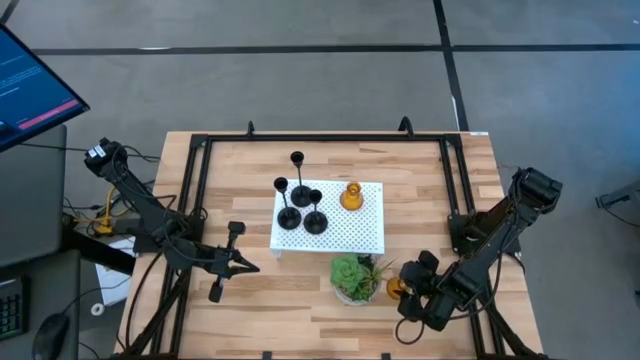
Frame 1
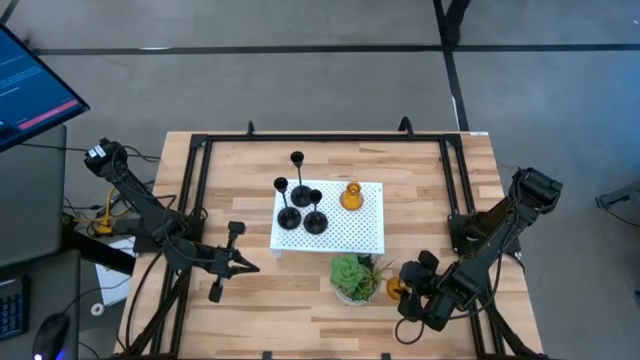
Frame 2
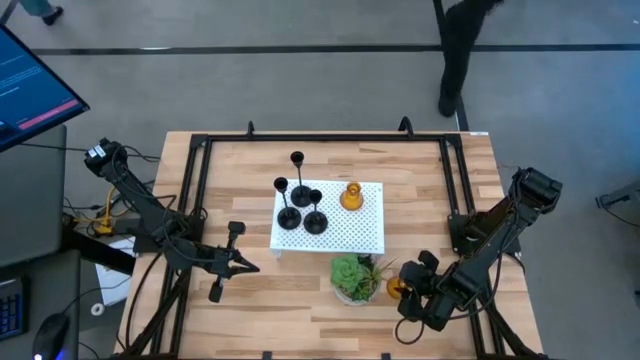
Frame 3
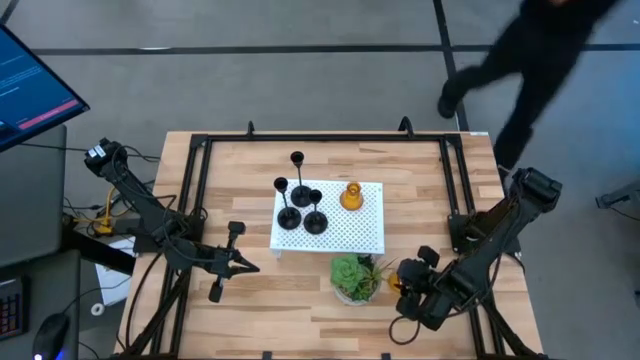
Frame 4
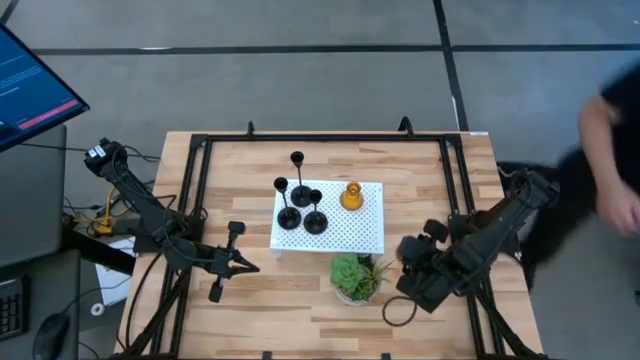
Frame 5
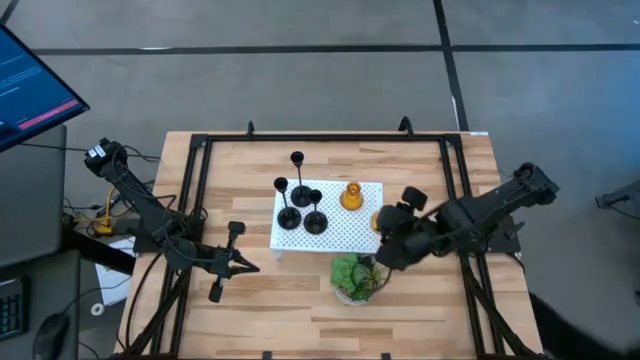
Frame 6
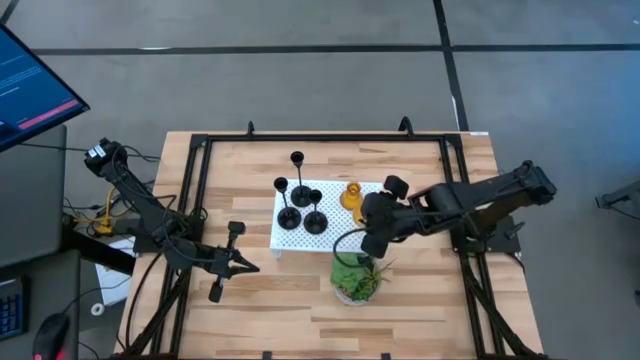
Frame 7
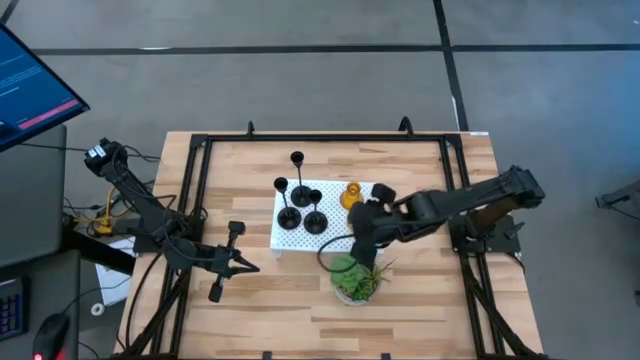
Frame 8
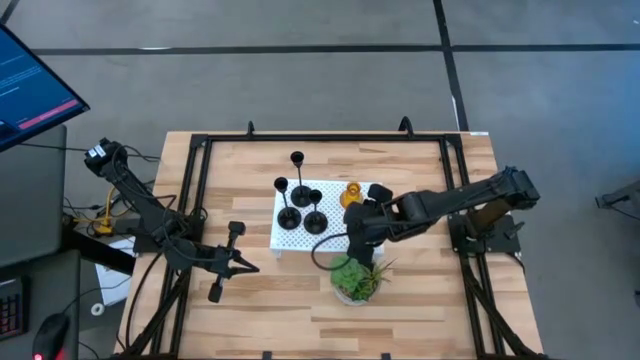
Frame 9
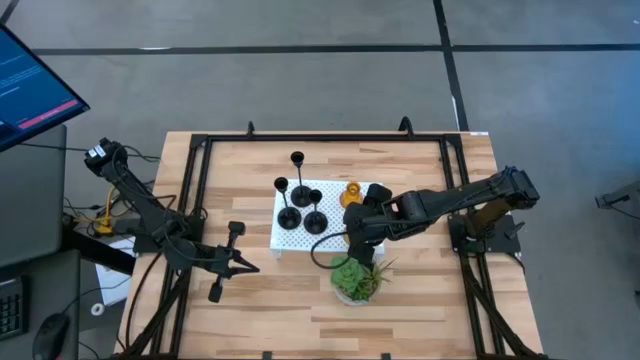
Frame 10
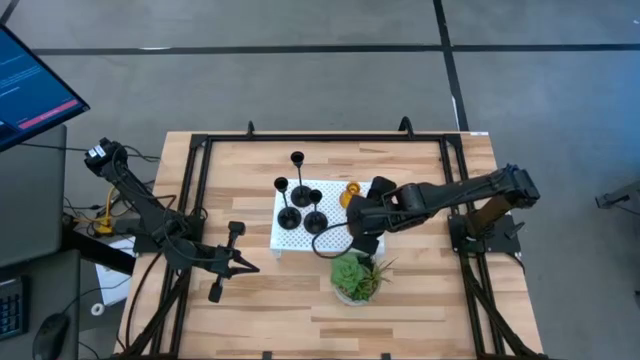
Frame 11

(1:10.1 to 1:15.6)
Task: Pick & Place candle stick holders
Put the orange transparent candle holder on the shelf

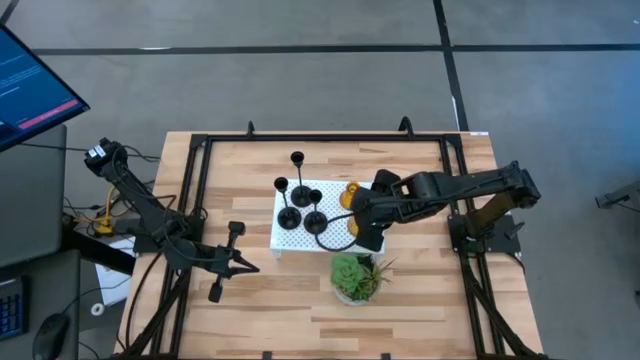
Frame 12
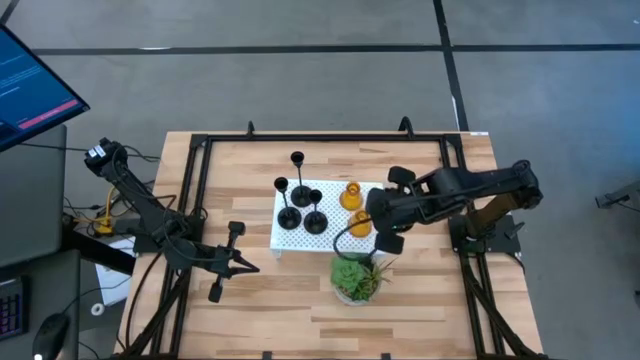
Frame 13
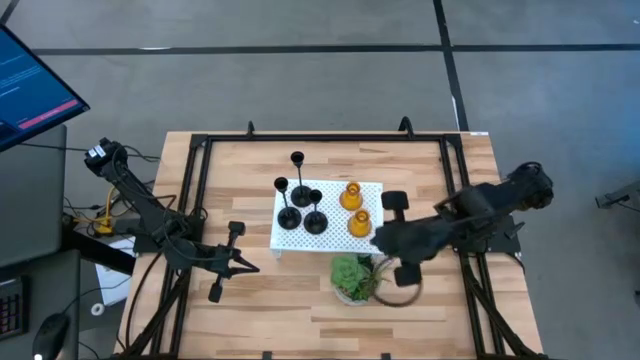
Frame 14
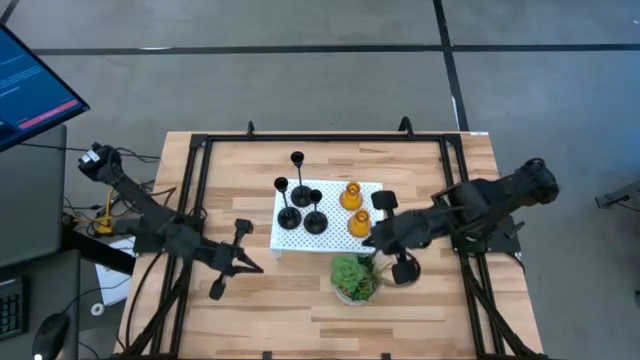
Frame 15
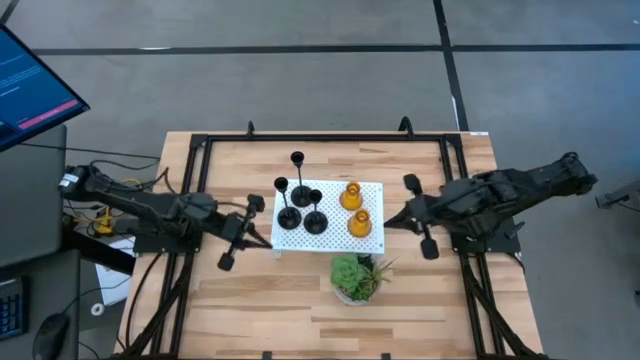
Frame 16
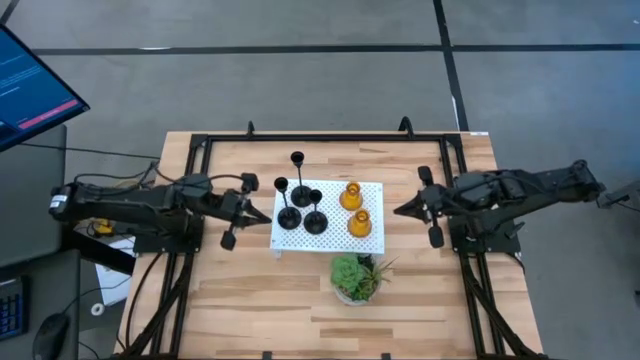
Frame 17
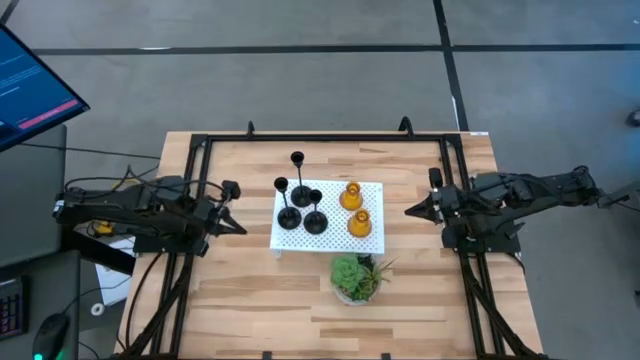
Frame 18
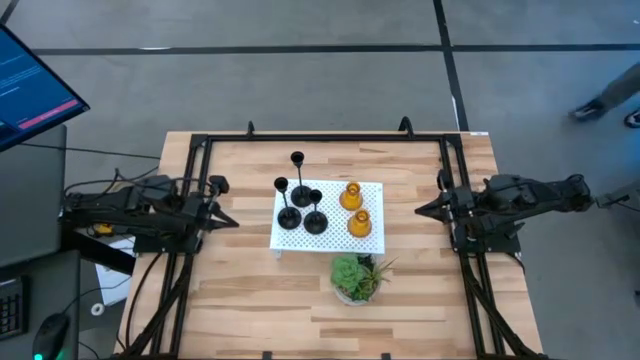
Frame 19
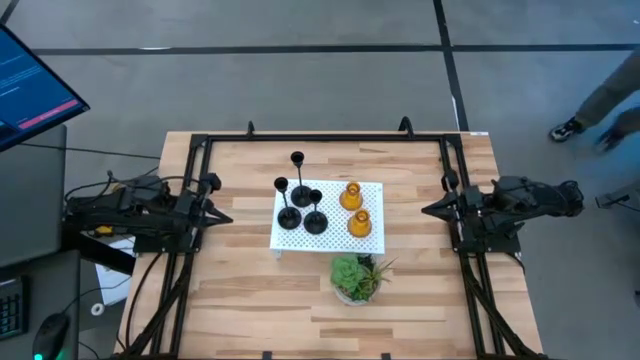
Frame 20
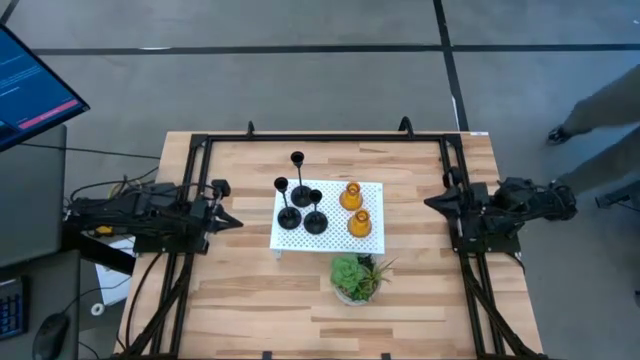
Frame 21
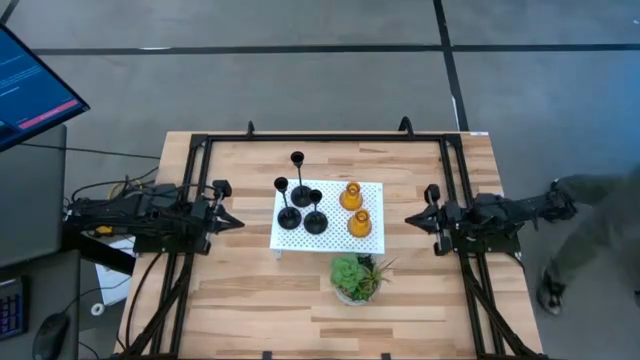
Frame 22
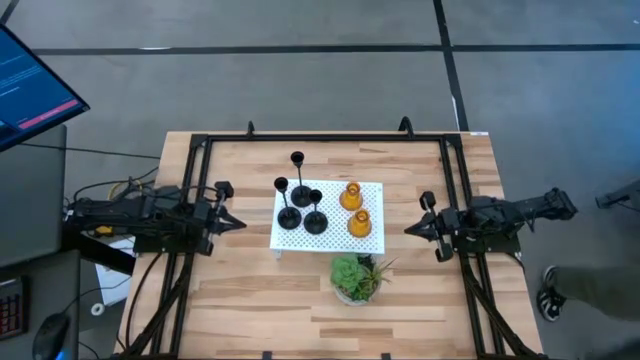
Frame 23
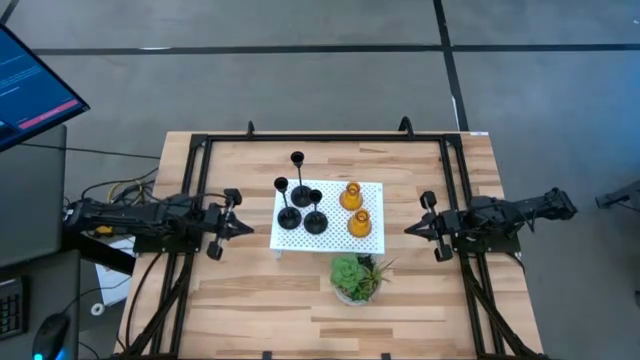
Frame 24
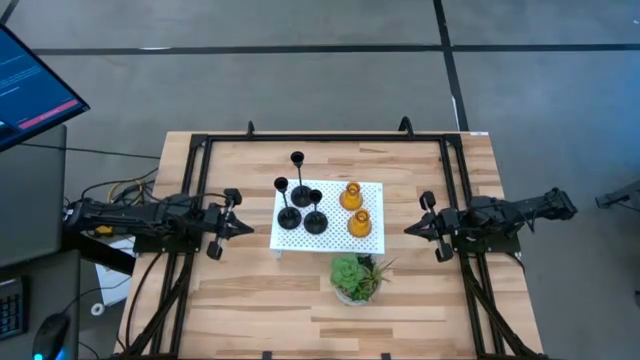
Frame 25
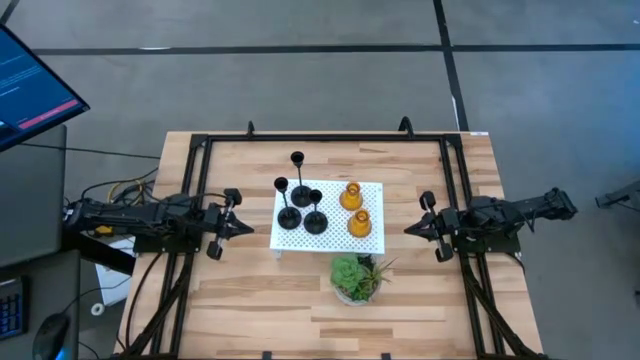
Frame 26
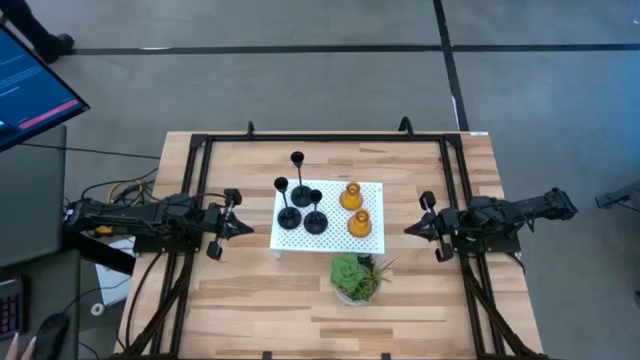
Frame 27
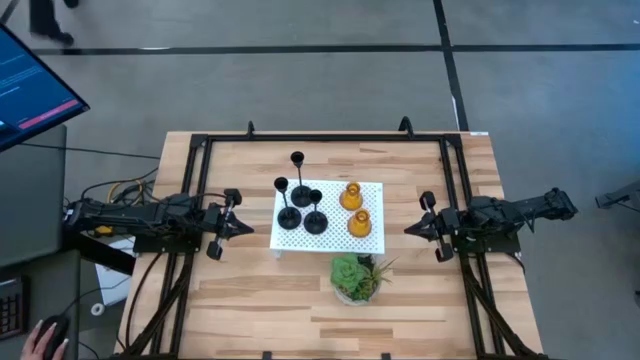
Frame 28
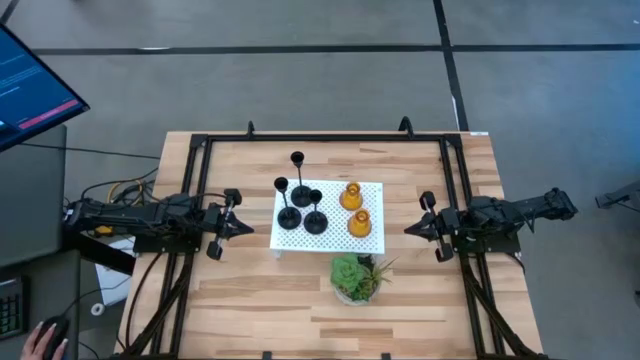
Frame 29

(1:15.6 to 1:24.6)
Return to Home Position

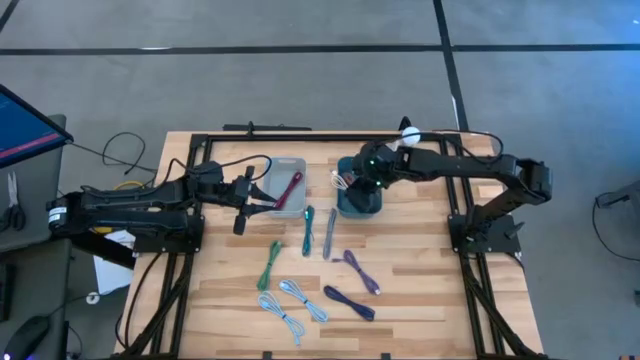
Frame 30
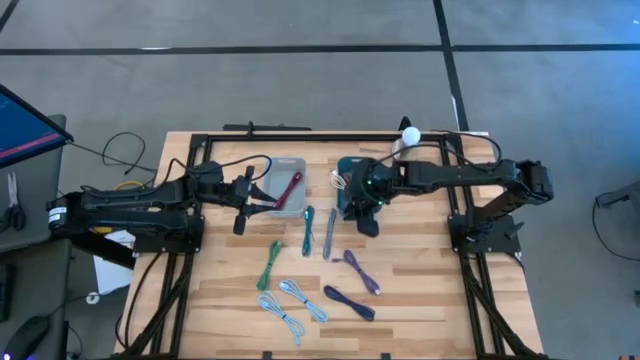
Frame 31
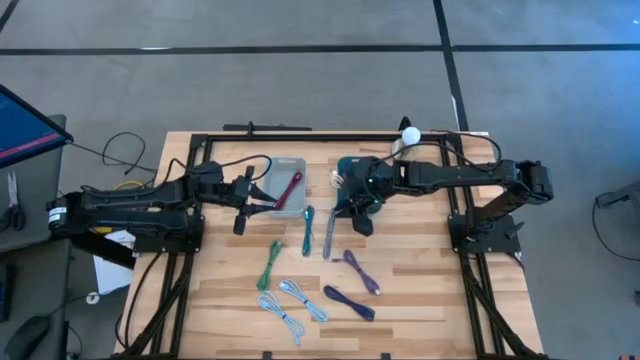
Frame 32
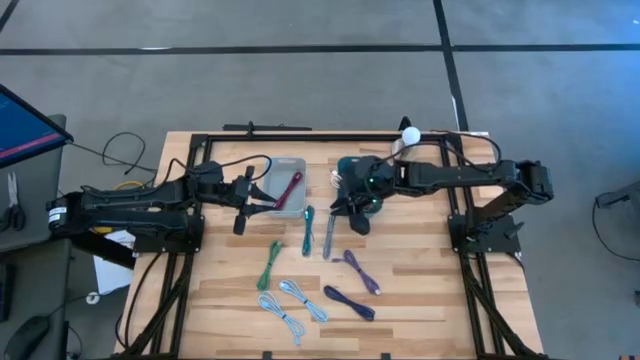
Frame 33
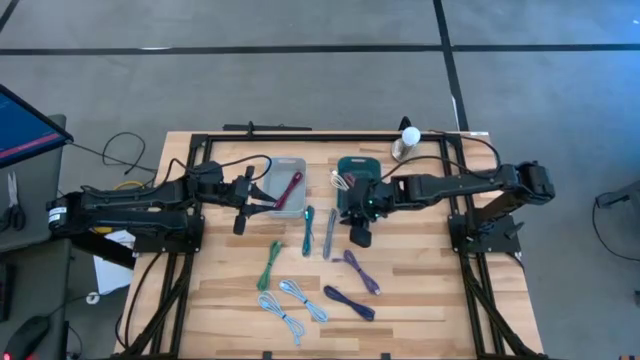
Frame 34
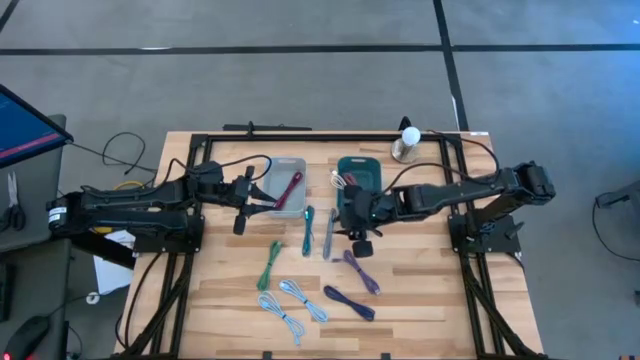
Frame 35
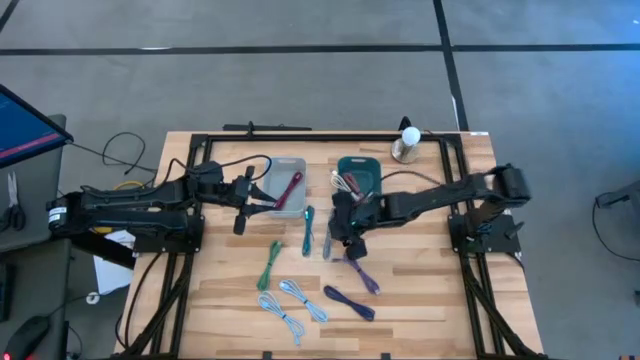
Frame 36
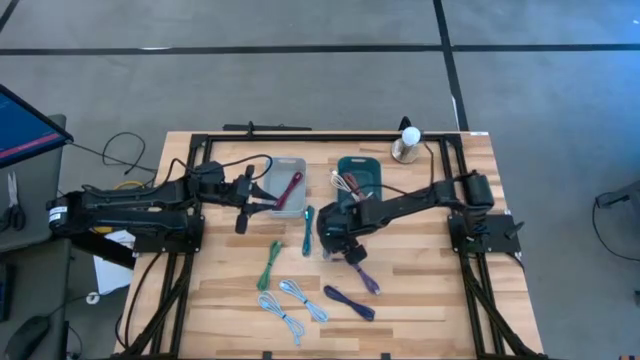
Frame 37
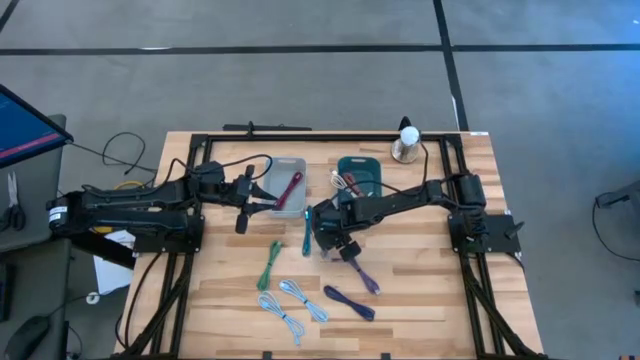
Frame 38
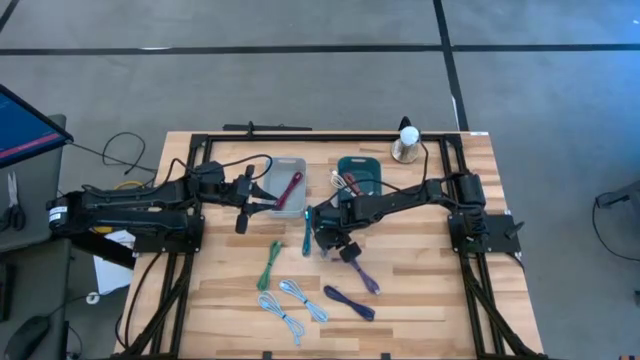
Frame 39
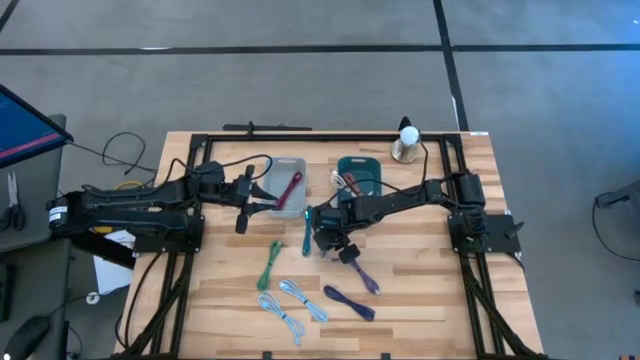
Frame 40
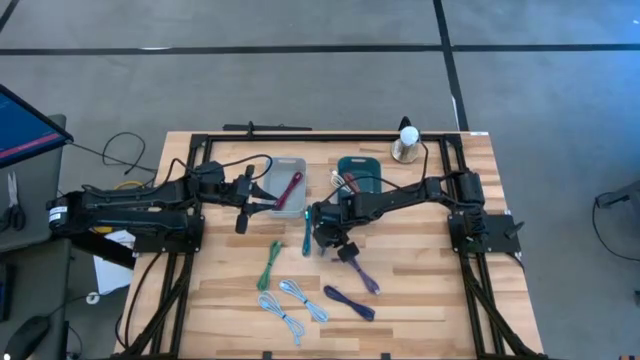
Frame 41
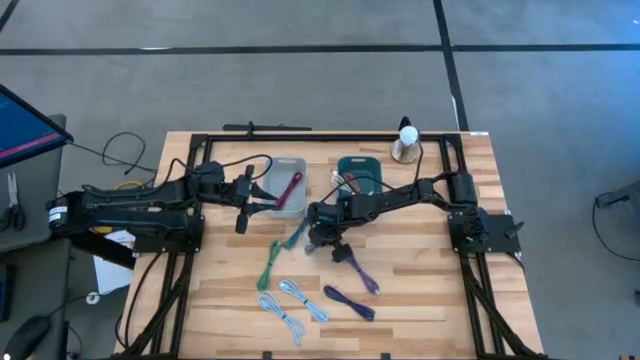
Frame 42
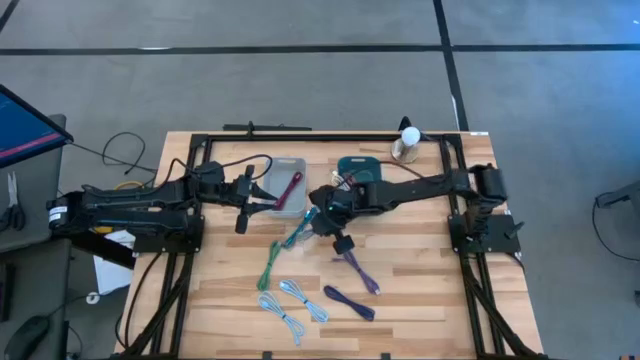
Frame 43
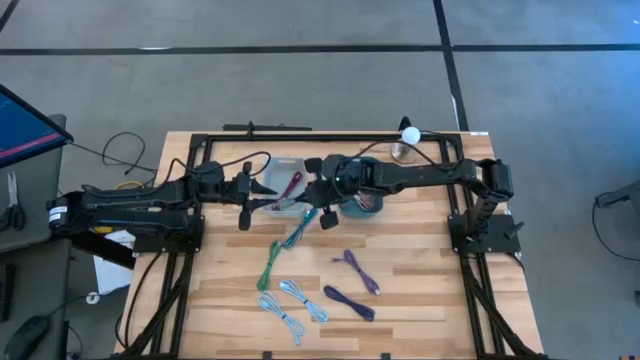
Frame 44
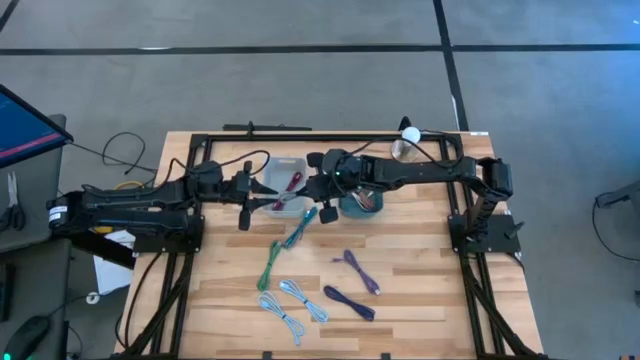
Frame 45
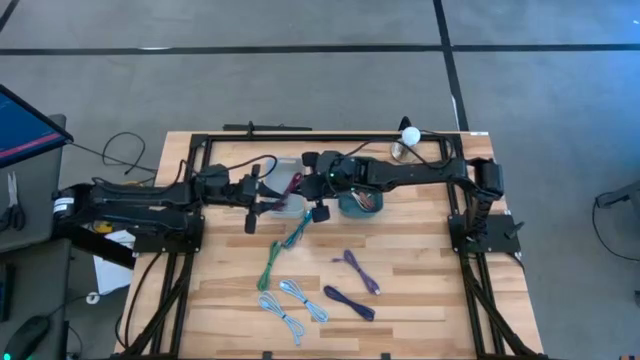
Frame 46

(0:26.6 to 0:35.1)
Task: Pick & Place USB Port
Put the white patterned charger cable into the white bin
